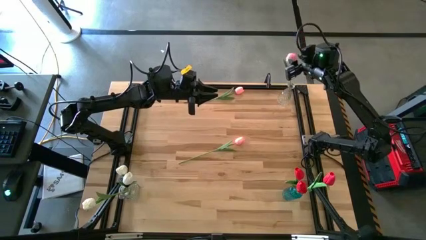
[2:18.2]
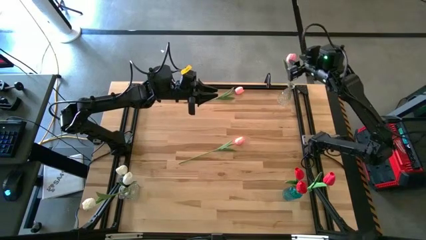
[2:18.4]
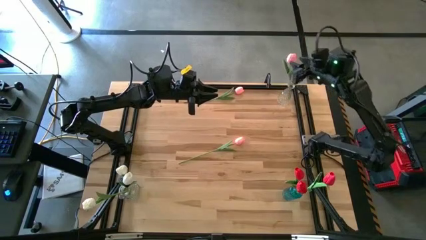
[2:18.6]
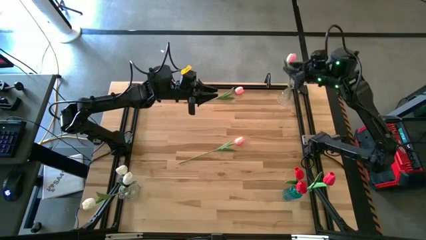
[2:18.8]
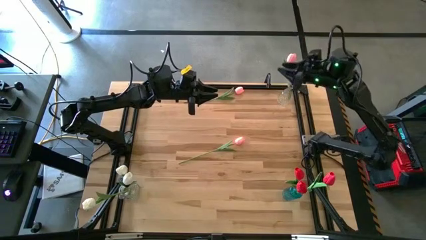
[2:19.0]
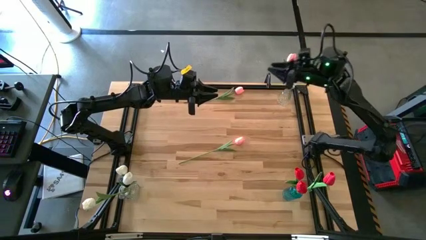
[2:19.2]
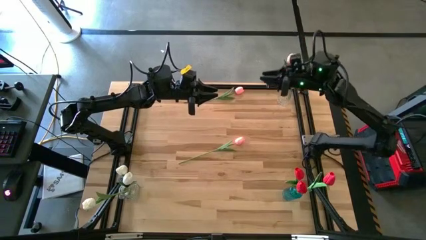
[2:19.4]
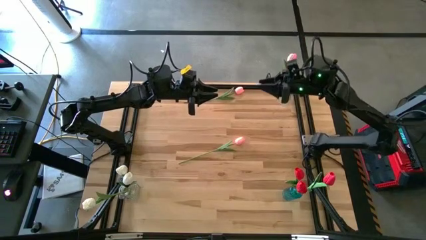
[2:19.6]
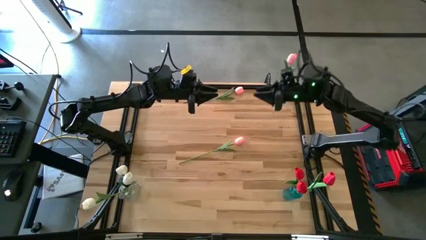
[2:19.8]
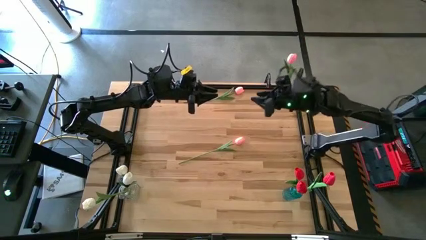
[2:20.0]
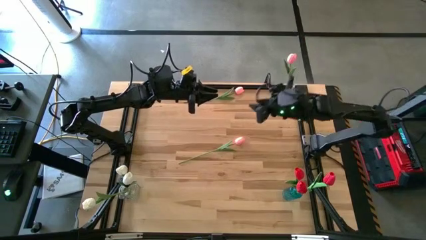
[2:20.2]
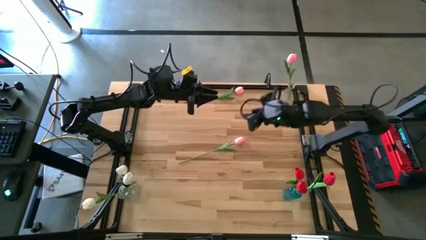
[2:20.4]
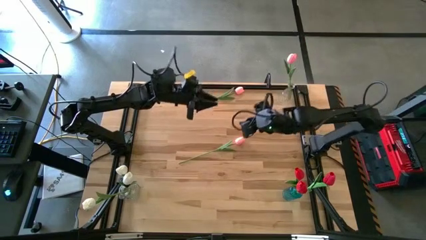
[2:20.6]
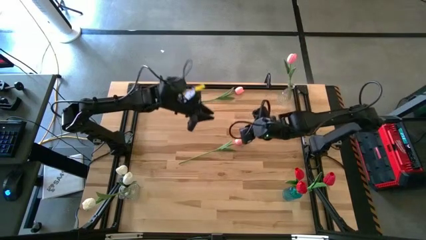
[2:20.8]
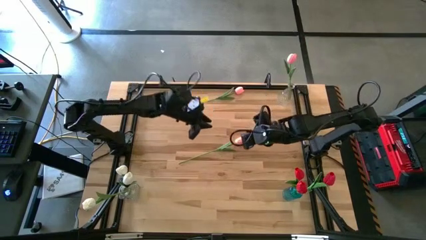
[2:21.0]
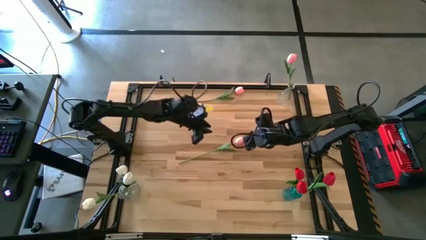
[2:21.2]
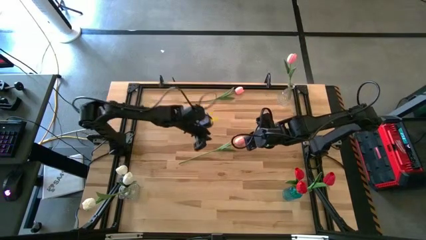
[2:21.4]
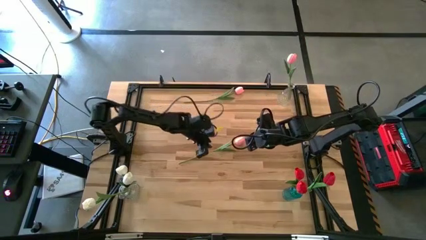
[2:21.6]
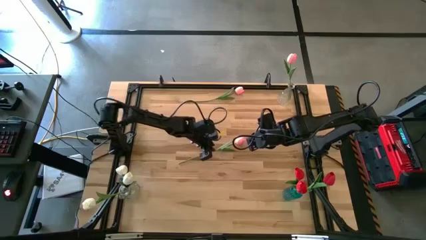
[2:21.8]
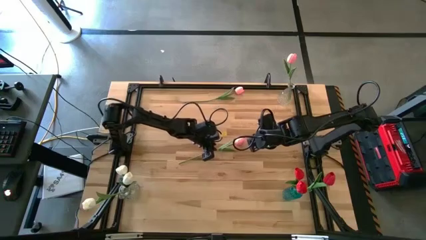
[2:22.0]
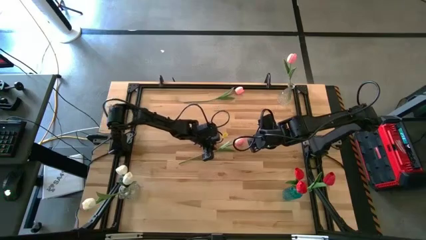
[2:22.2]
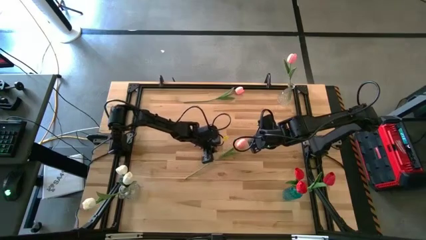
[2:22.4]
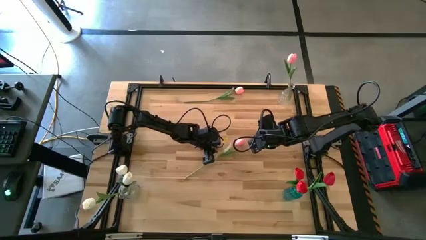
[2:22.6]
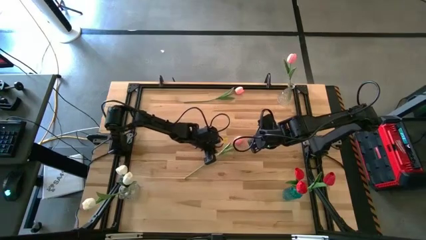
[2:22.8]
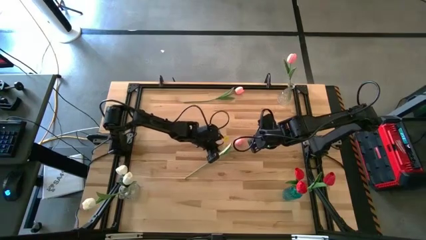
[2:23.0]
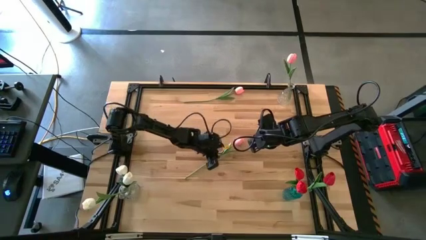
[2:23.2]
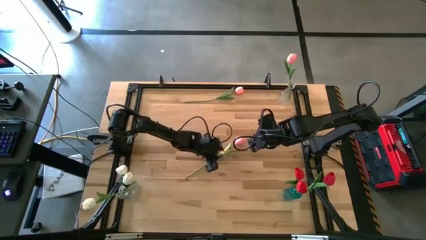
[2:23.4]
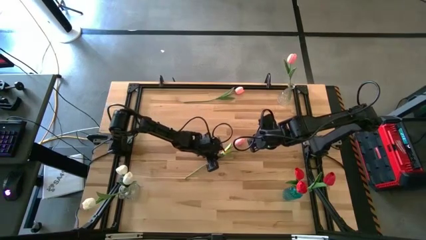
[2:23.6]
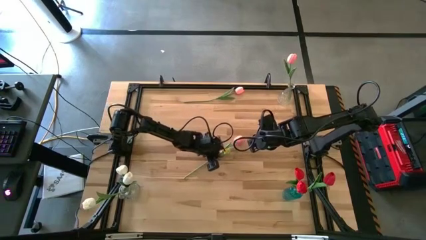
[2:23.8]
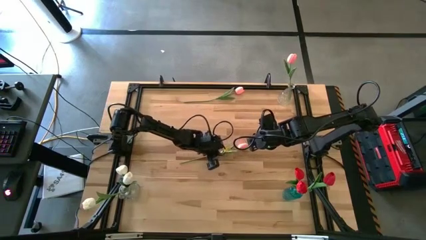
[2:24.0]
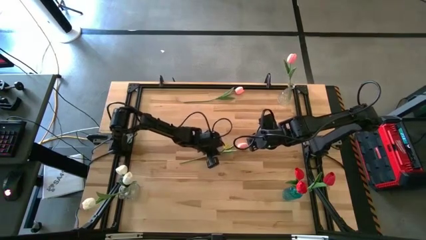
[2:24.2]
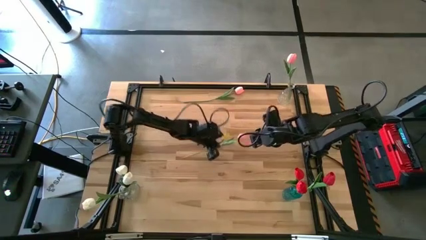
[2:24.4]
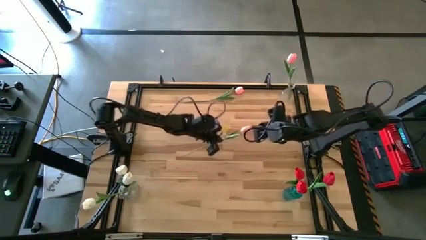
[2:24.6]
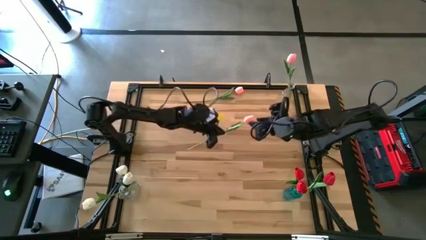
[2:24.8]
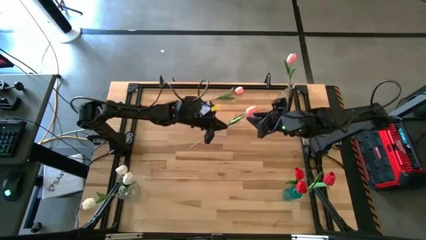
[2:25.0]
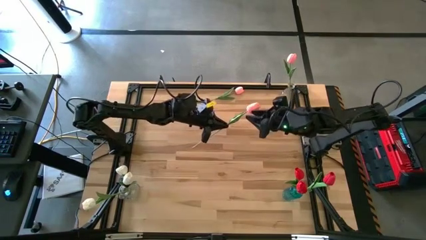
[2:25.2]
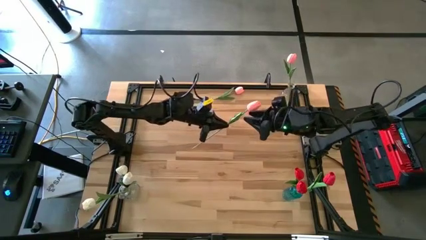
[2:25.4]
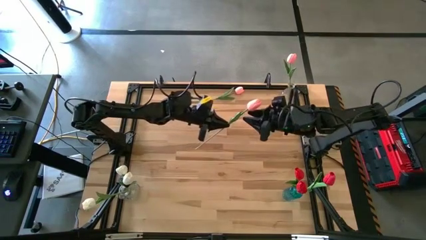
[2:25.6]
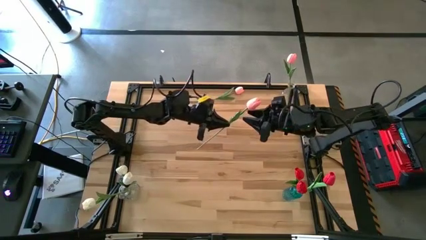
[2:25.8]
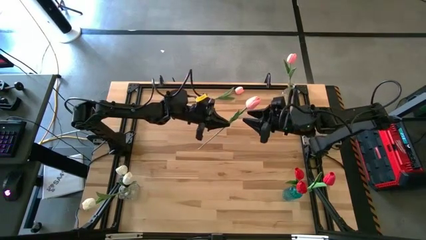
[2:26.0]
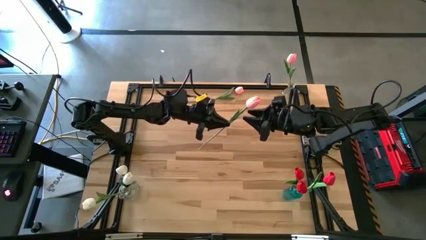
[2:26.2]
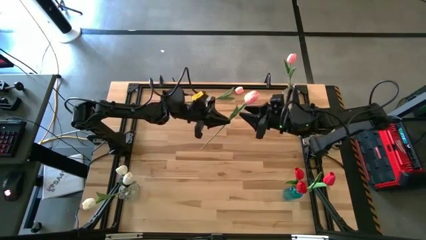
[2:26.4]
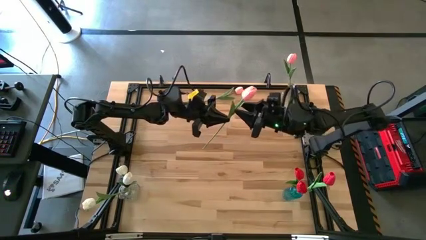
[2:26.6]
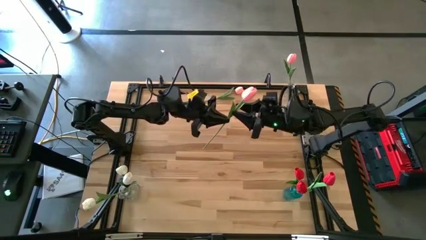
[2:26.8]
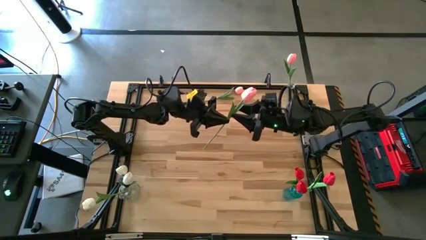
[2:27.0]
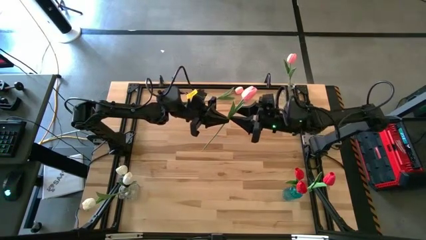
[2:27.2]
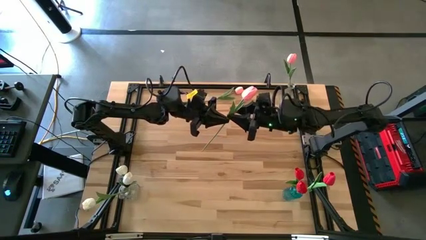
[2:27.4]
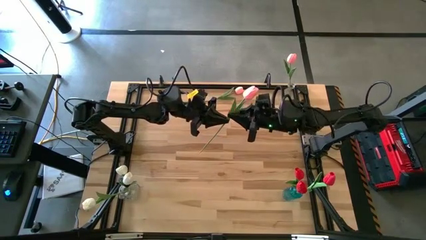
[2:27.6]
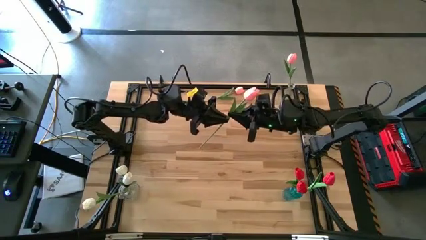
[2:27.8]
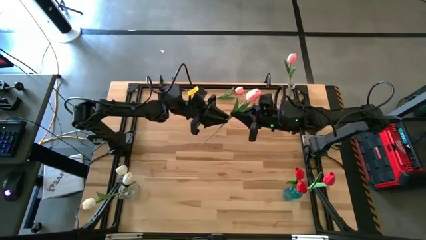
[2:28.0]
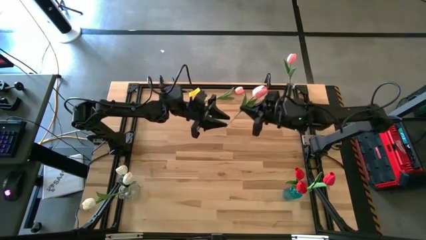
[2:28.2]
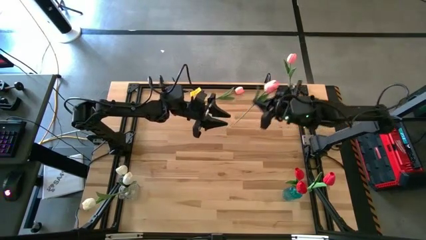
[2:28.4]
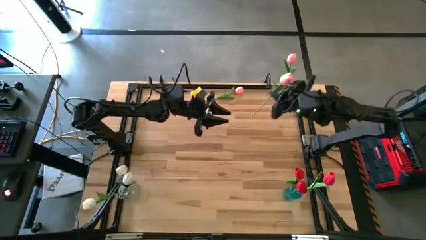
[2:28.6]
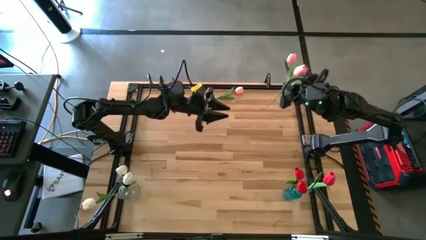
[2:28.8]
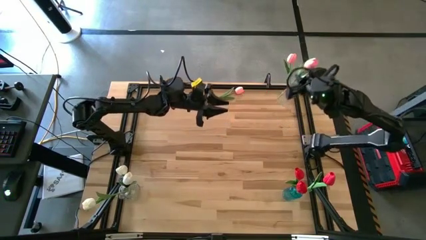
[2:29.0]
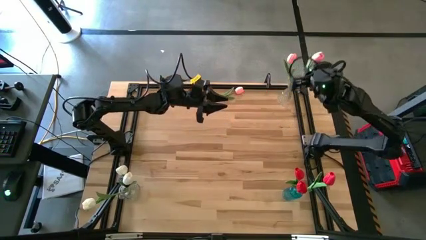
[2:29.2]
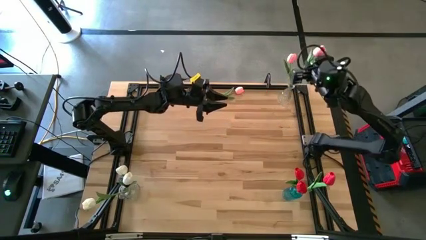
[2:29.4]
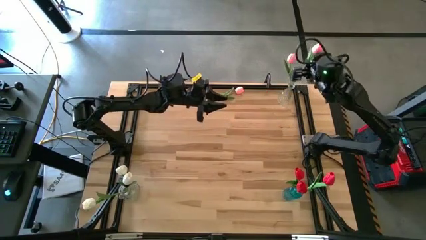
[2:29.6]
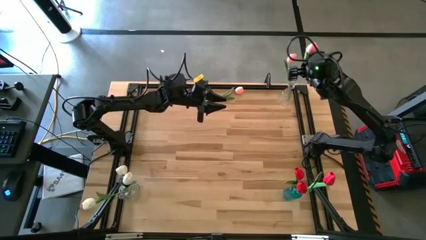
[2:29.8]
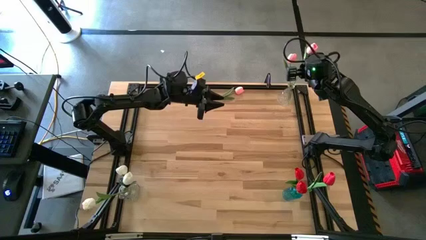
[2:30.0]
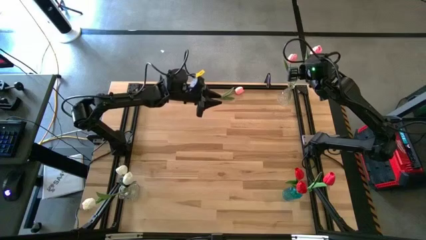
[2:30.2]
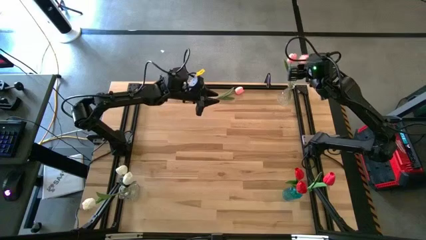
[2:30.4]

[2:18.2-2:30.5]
Task: Sort flowers into vase by color
Put the bottom pink flower into the top transparent vase

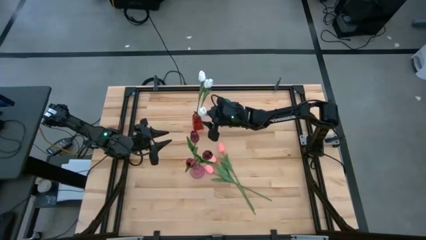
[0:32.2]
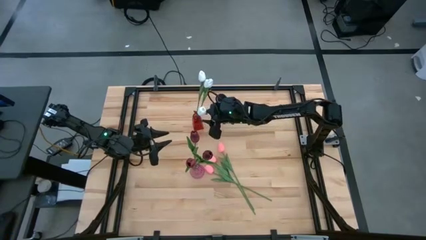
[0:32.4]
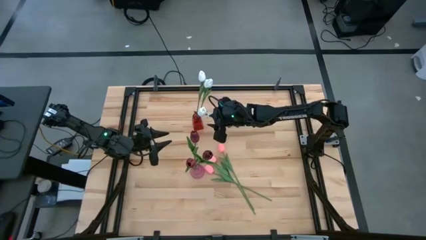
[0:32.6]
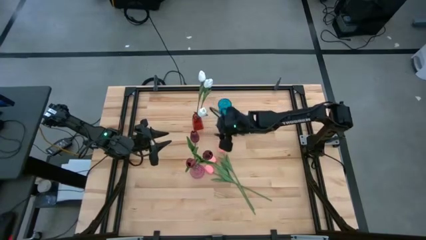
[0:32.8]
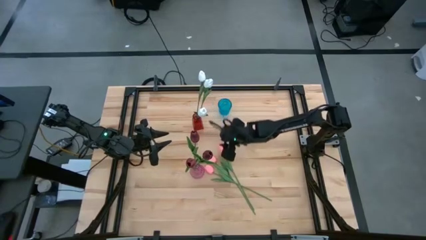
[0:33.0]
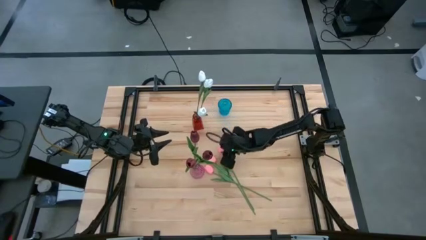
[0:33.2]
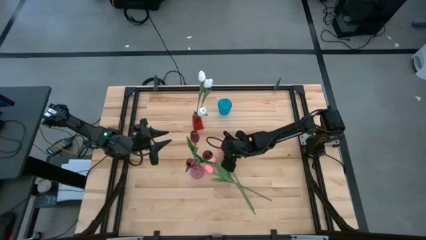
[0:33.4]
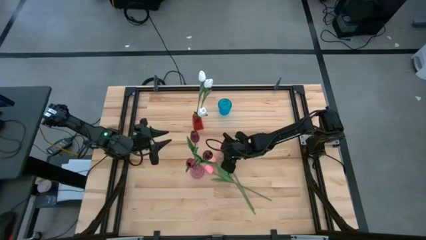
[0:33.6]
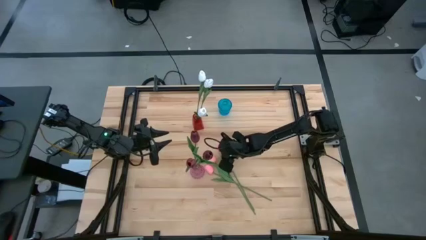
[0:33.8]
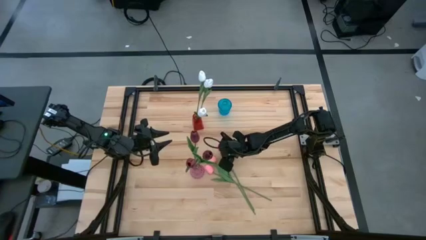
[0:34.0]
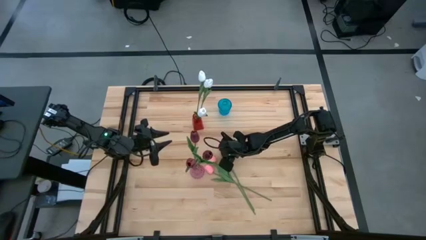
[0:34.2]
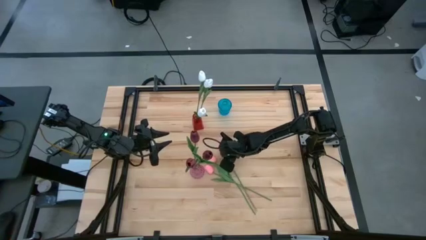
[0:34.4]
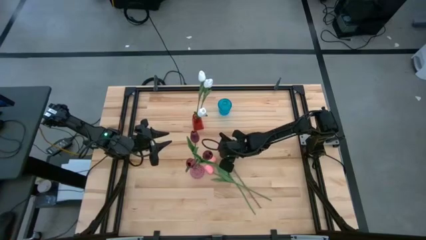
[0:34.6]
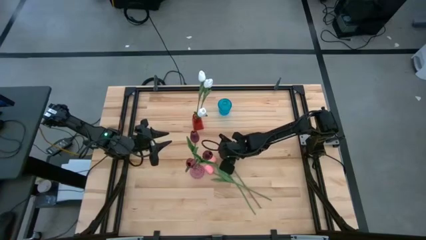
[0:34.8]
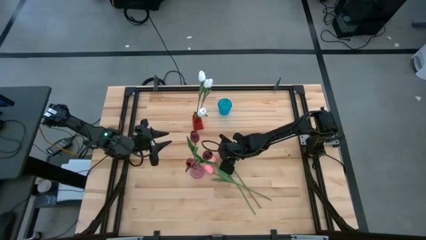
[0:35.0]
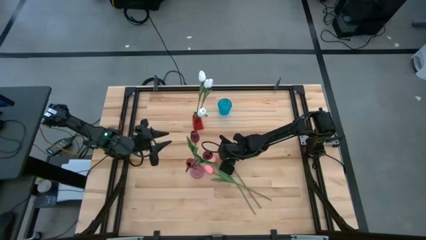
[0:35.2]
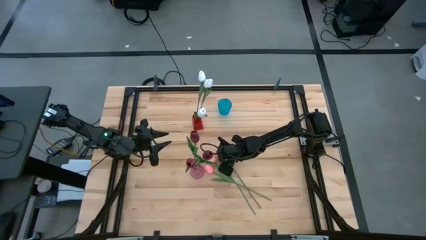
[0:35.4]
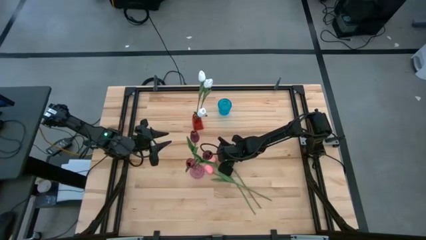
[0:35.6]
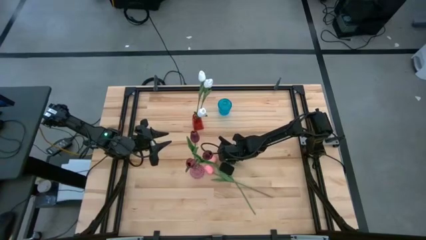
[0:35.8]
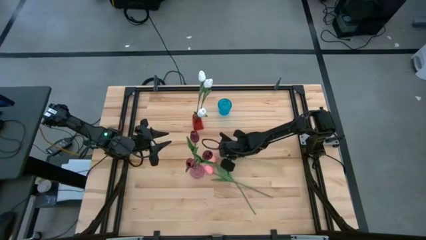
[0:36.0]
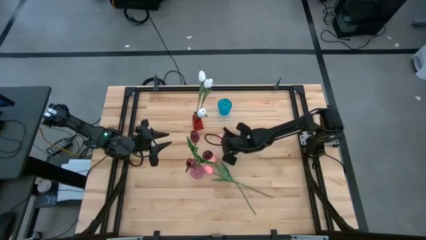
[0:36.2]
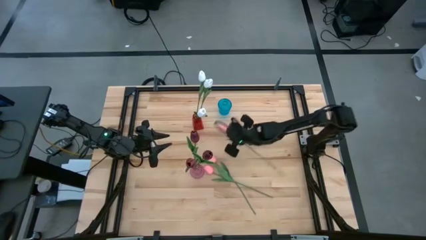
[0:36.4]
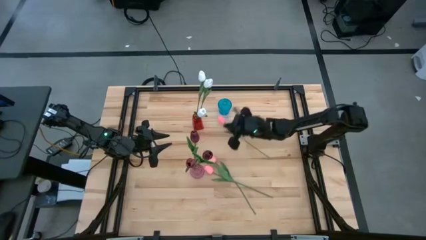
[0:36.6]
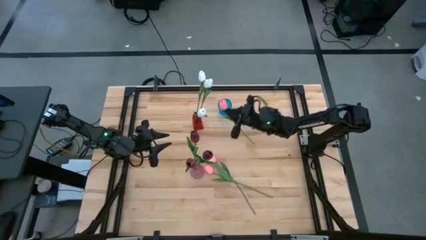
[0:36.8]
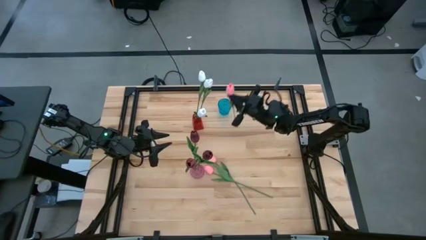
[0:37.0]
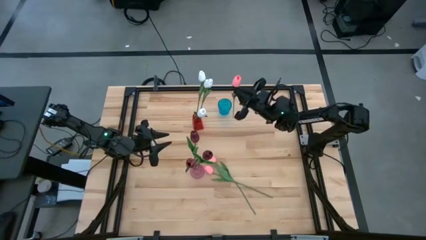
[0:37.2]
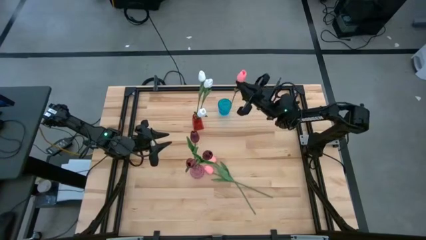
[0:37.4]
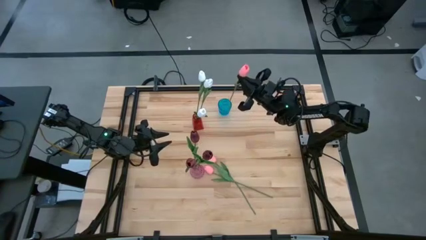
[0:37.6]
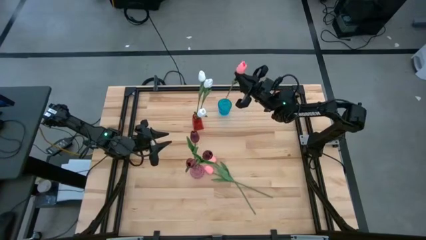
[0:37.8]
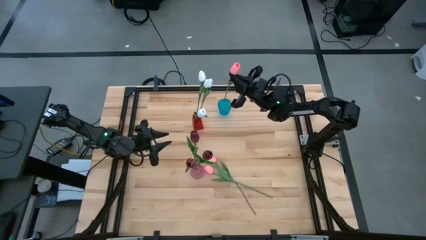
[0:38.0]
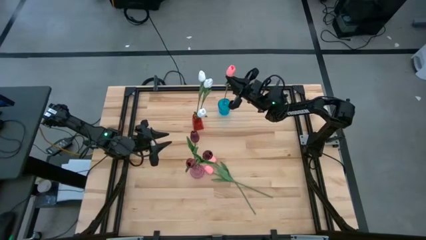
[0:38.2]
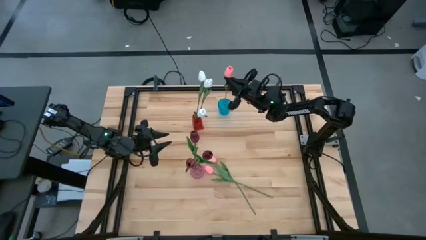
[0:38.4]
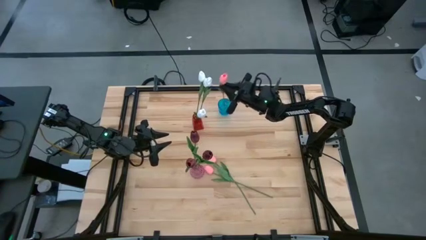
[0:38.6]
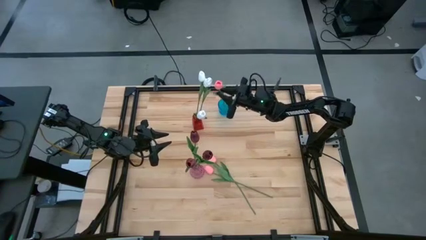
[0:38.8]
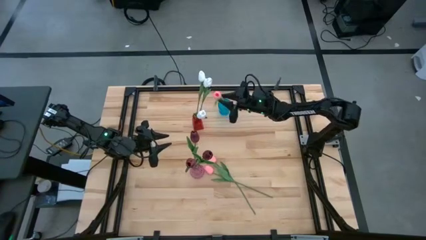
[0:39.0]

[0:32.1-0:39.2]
Task: Sort flowers into vase by color
Put the top pink tulip into the blue flower vase
